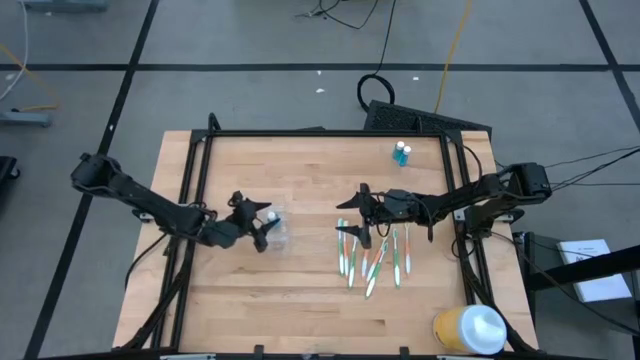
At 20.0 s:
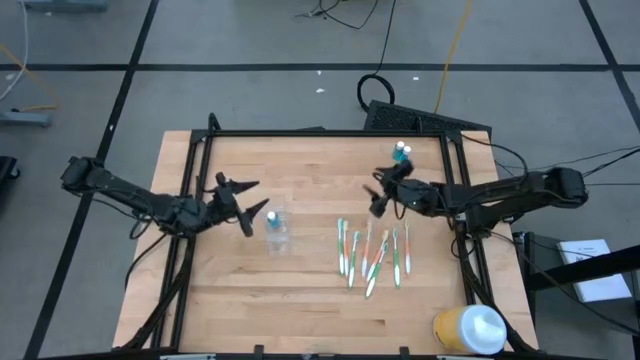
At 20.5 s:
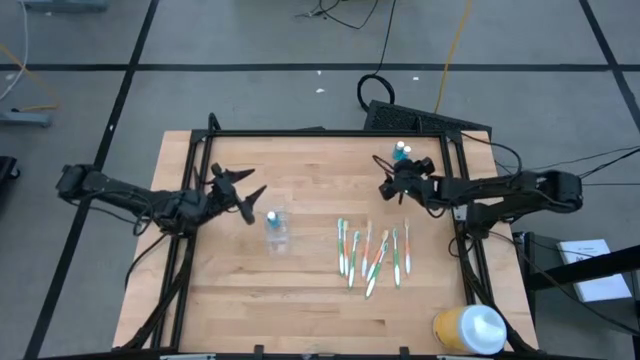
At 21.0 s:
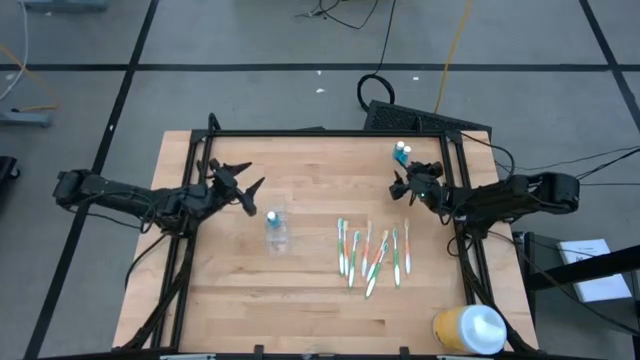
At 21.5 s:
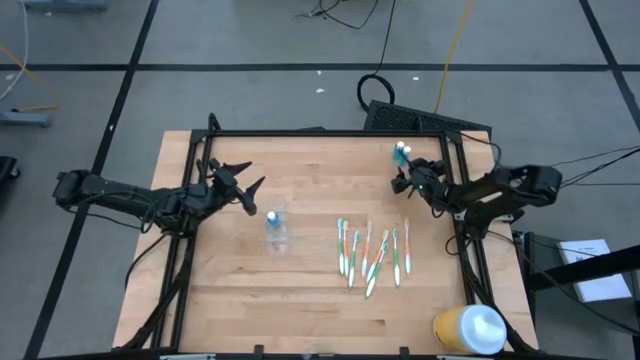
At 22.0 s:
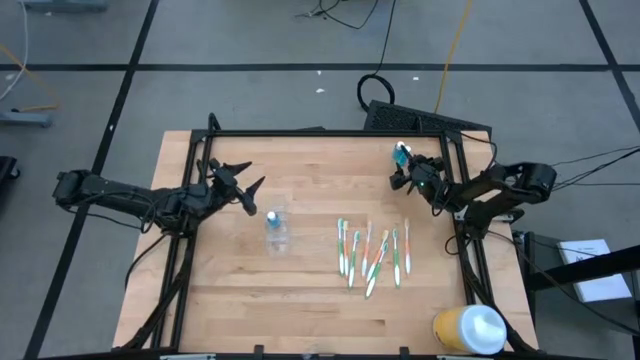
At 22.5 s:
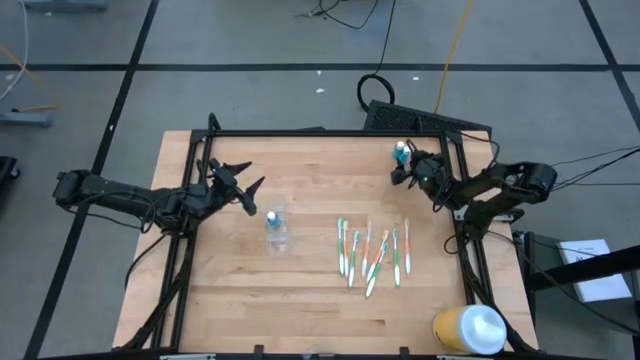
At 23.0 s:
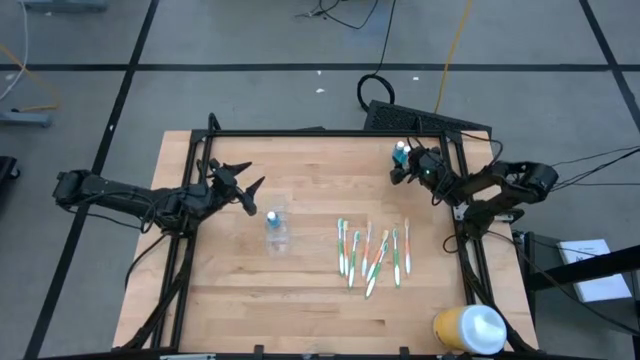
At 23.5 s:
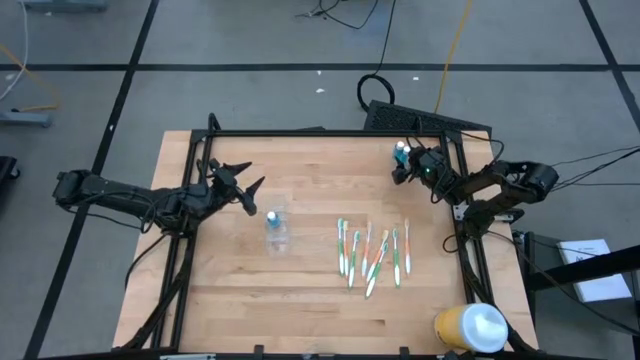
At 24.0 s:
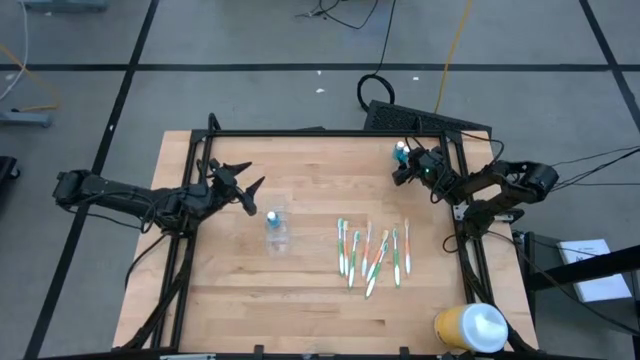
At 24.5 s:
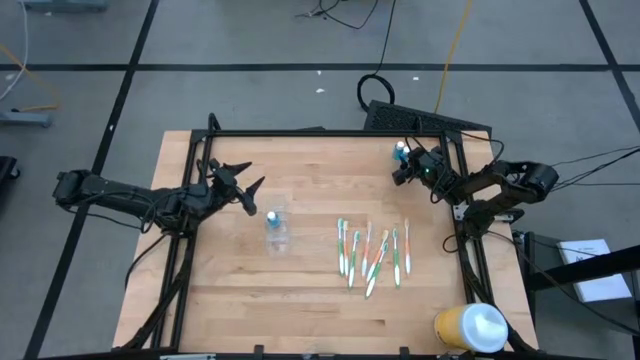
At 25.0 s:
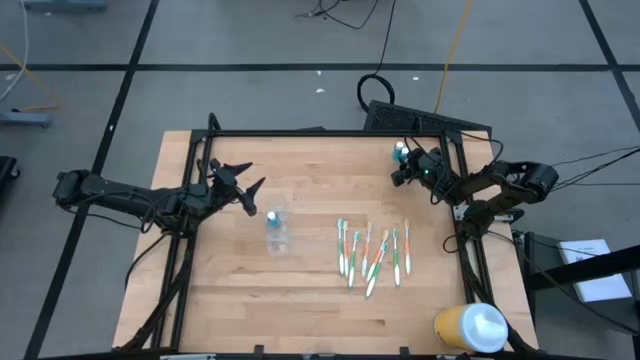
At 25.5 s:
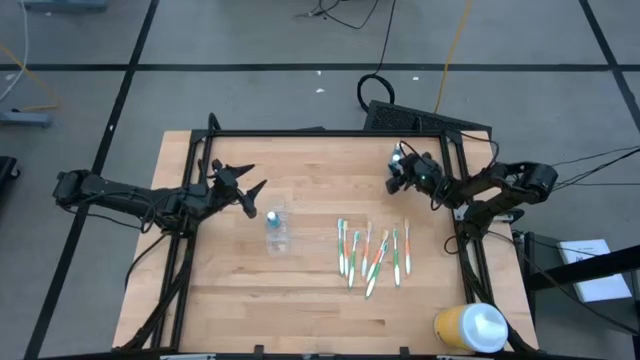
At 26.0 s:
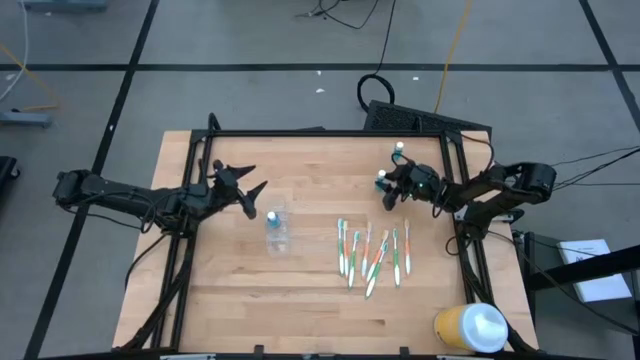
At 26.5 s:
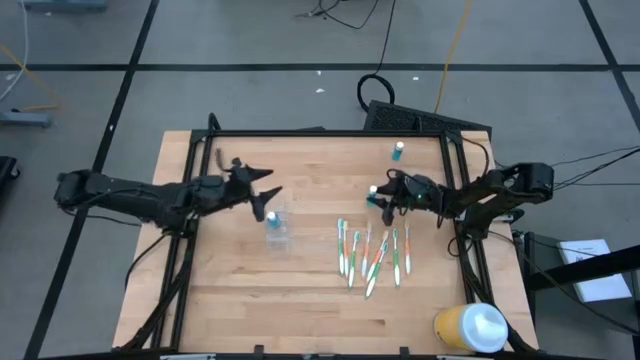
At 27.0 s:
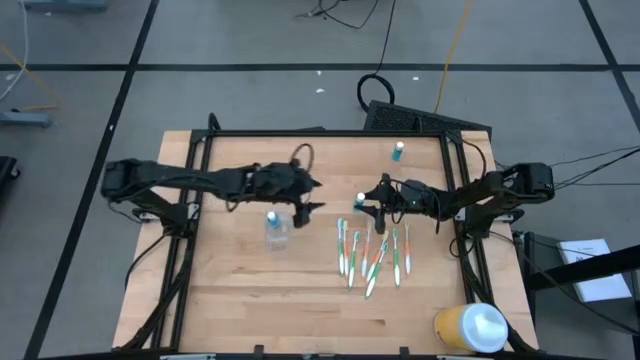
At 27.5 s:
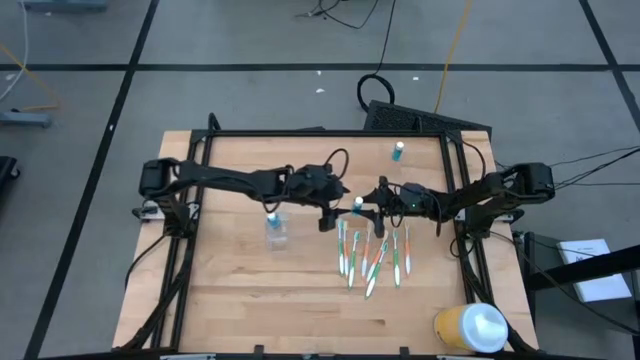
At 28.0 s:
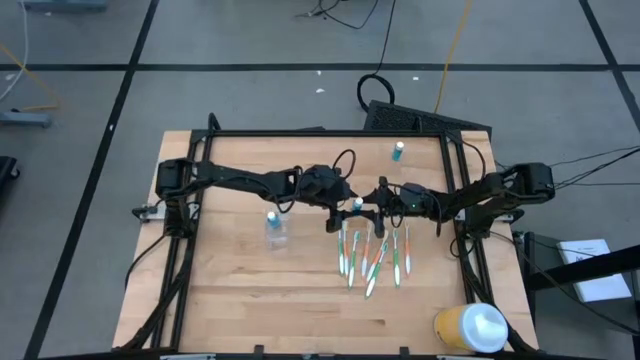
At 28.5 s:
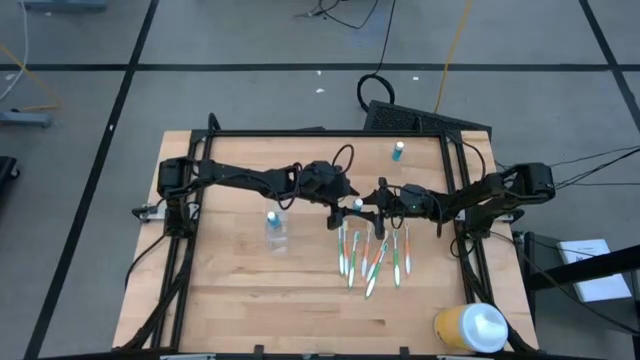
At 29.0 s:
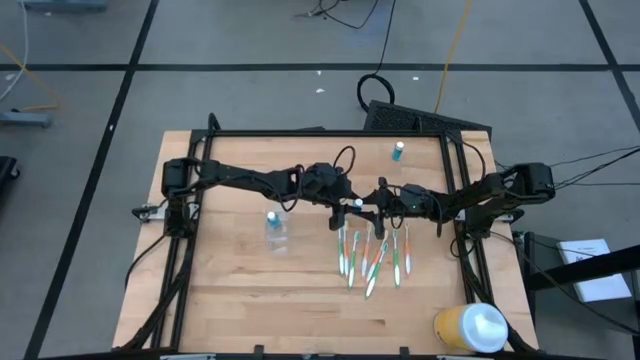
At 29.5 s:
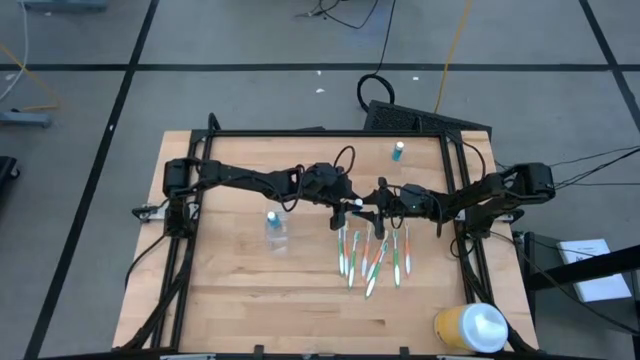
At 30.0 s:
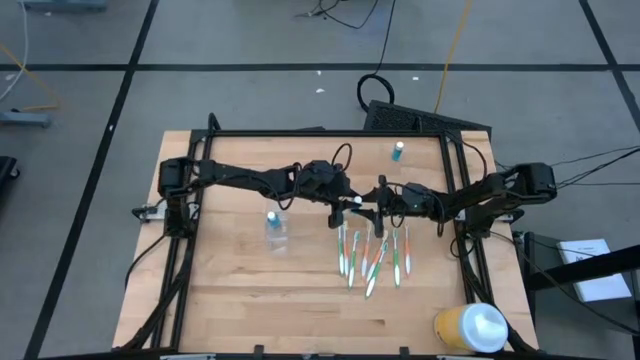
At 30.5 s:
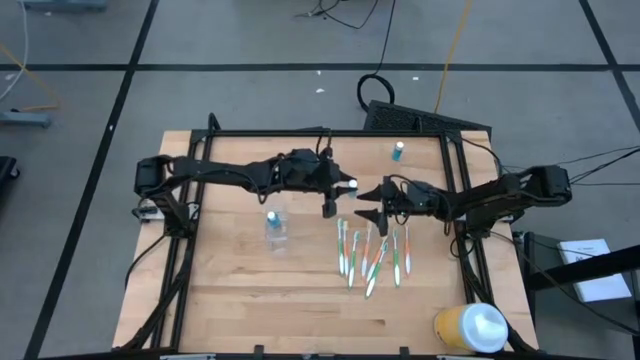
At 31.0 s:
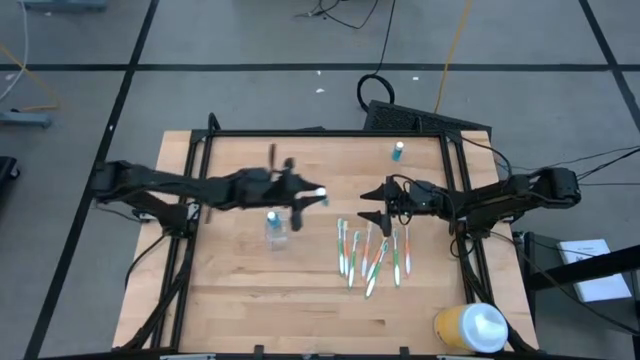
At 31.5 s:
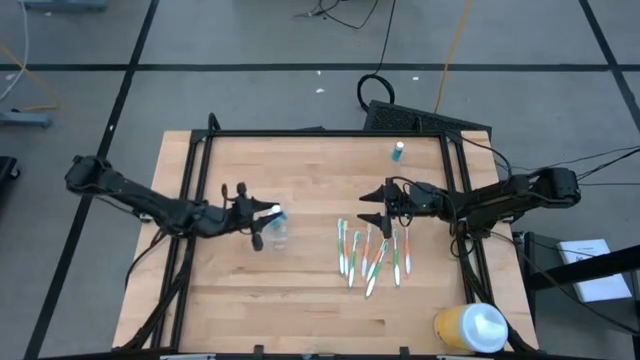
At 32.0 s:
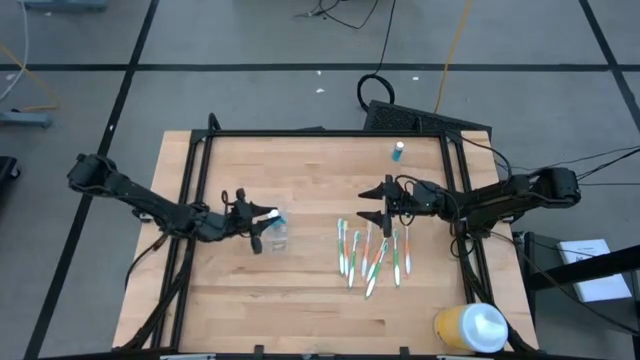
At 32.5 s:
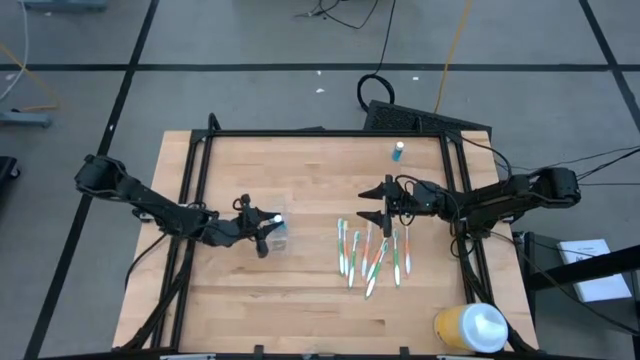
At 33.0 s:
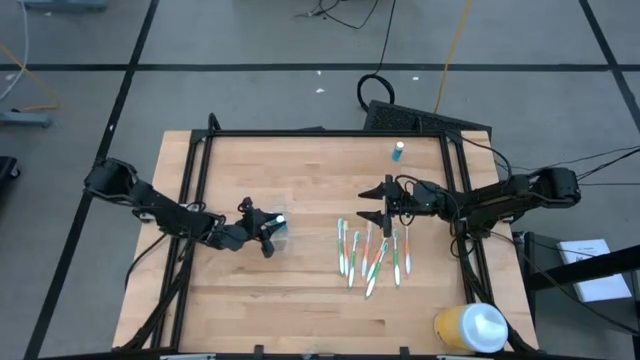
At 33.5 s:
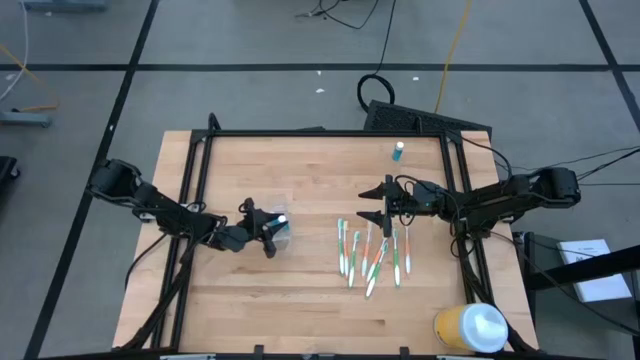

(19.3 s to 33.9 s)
Task: Pick & Place toothbrushing station
Put the blue mouthwash in the transparent organizer

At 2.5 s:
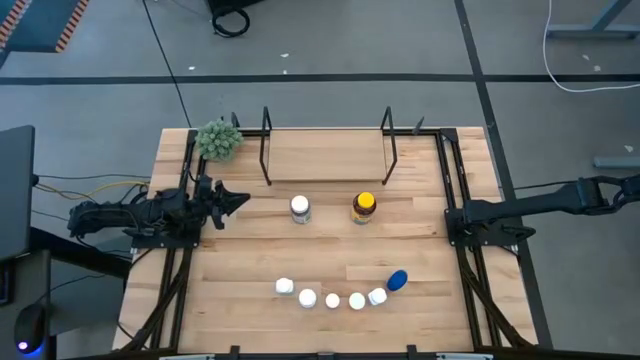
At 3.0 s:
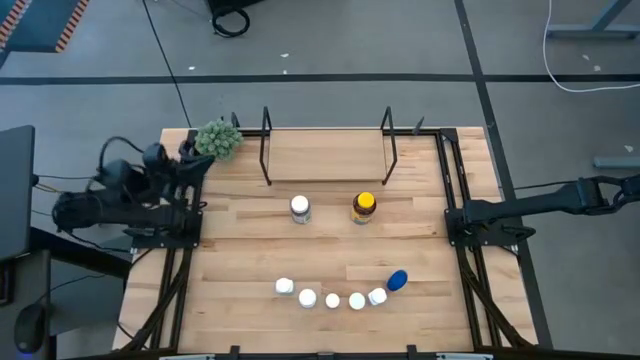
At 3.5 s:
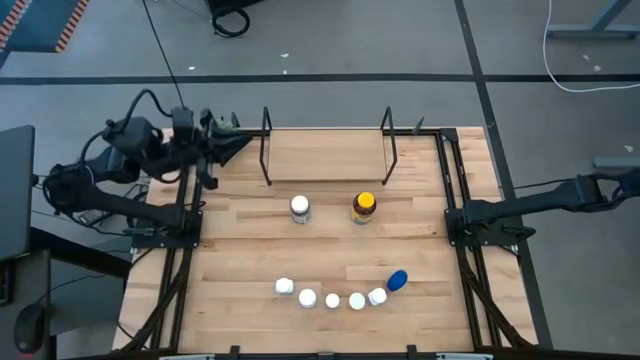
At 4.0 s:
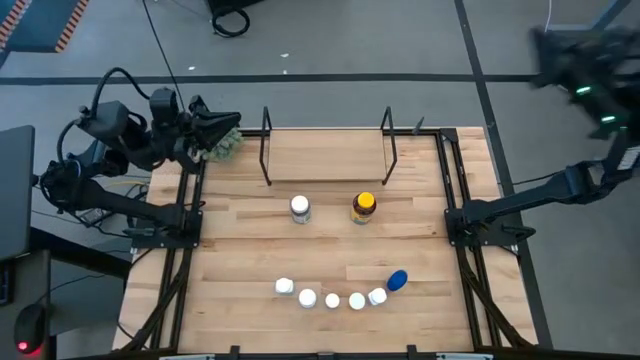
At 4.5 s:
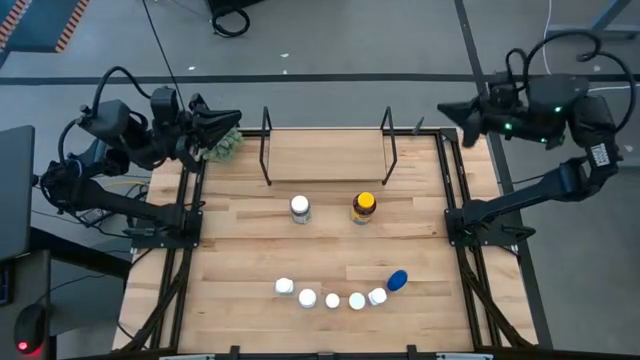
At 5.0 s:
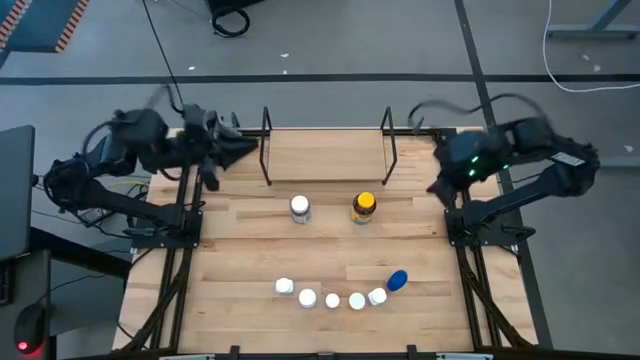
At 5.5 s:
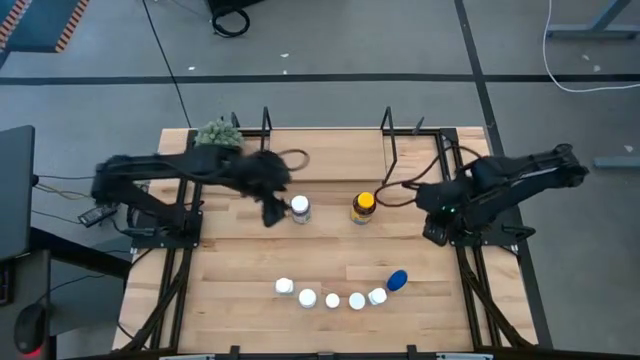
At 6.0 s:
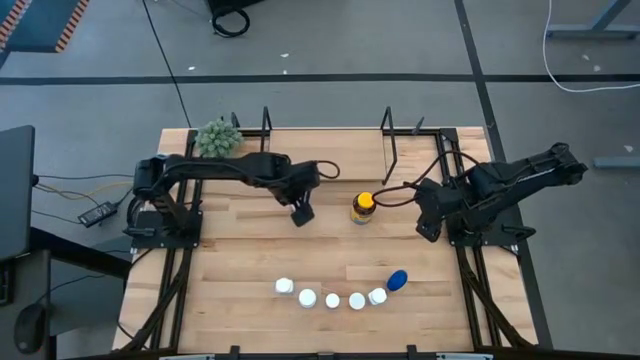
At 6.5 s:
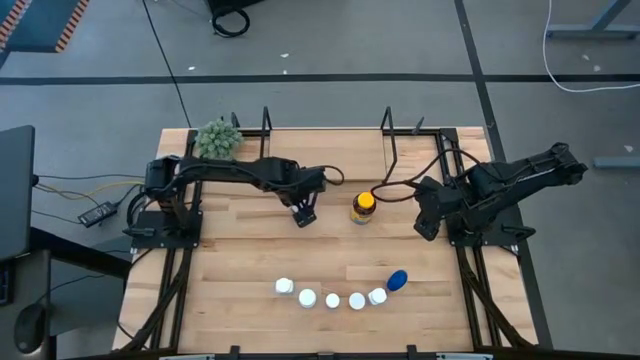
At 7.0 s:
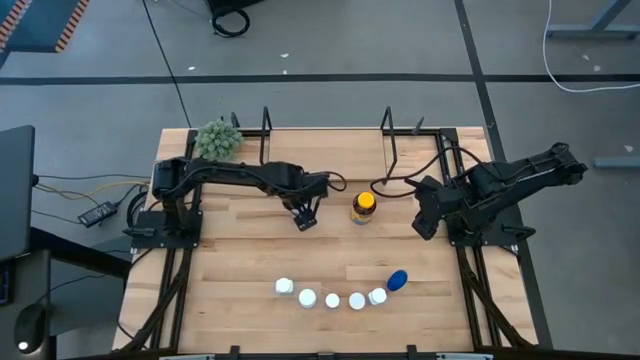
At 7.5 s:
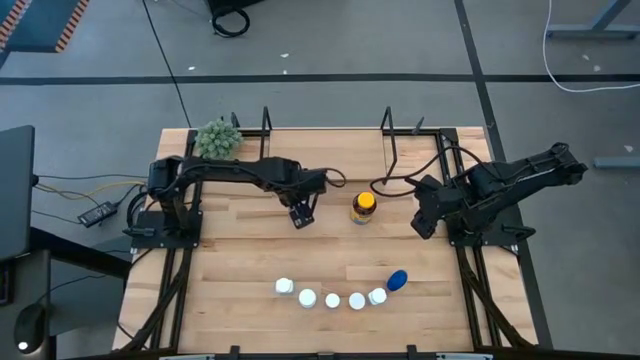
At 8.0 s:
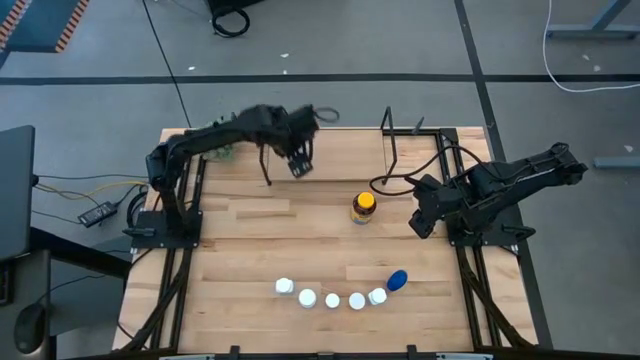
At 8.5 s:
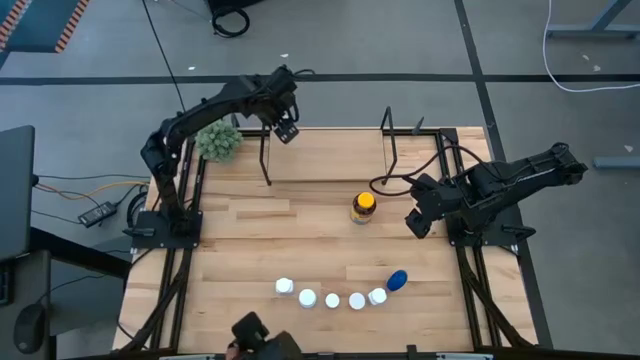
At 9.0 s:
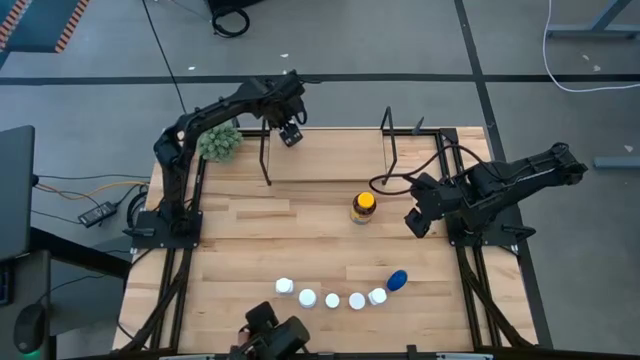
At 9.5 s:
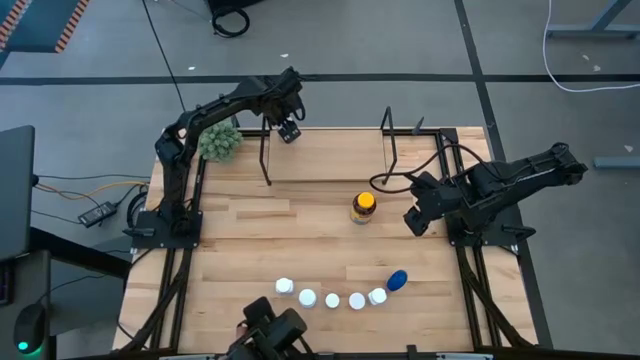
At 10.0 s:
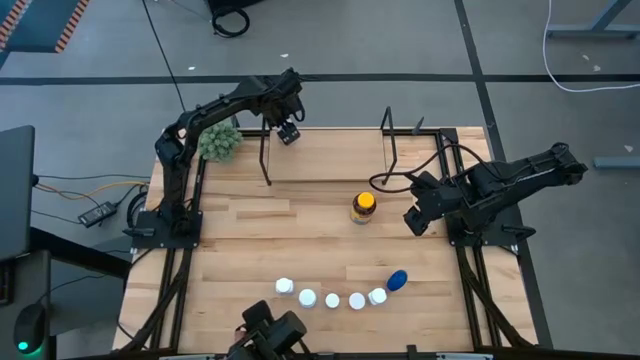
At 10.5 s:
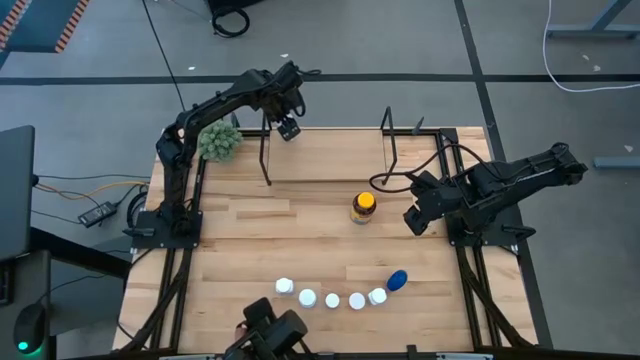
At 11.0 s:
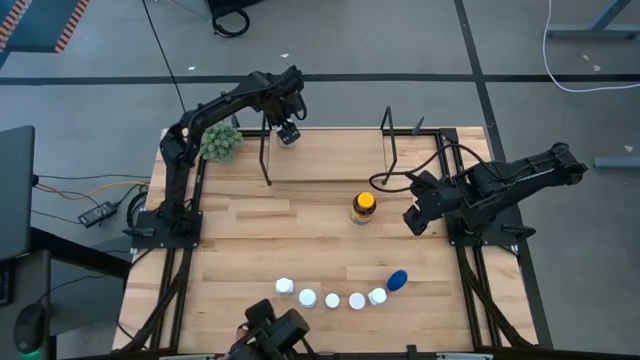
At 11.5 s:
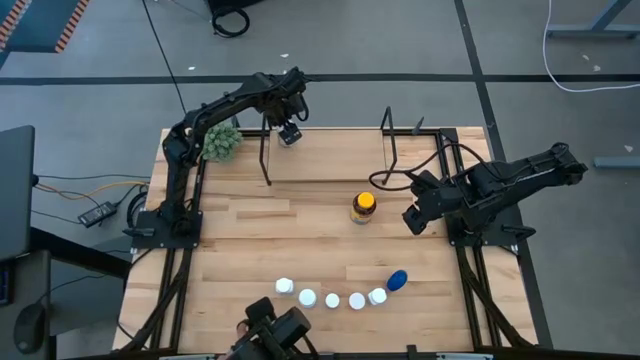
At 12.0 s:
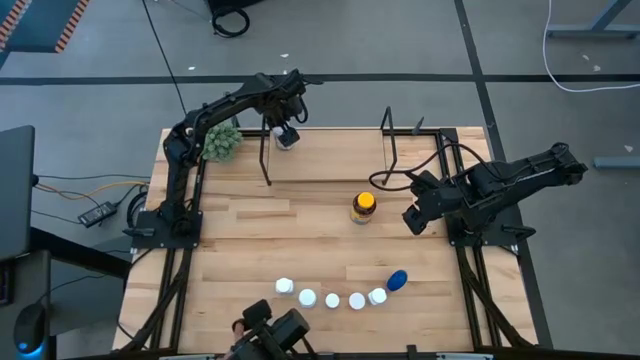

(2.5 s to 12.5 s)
Task: Pick and place medicine bottles onto shelf by color
Put the green medicine bottle on the shelf
